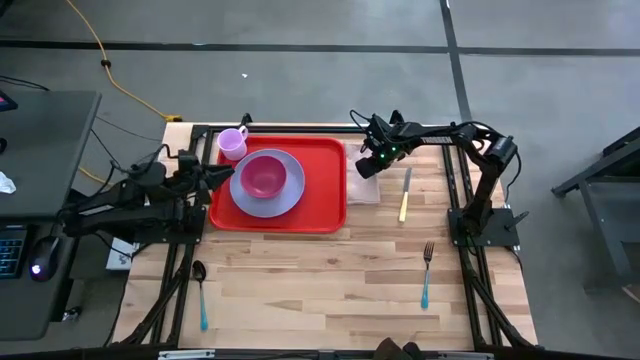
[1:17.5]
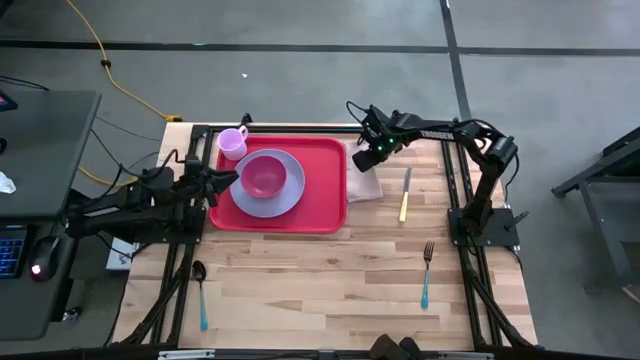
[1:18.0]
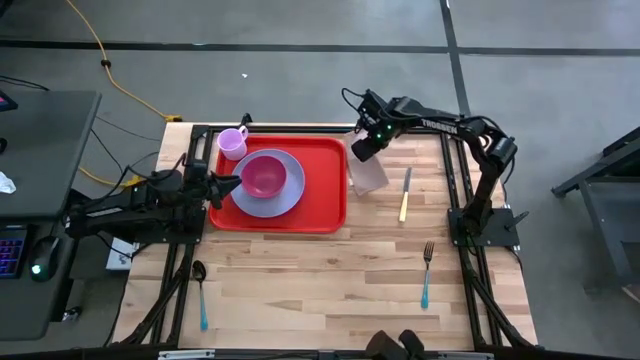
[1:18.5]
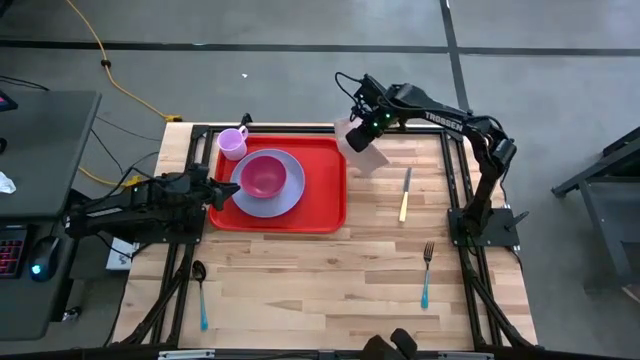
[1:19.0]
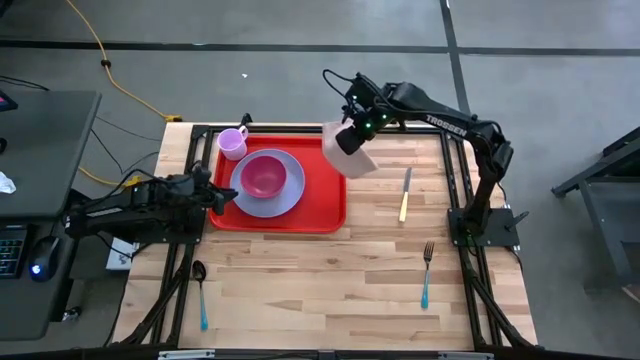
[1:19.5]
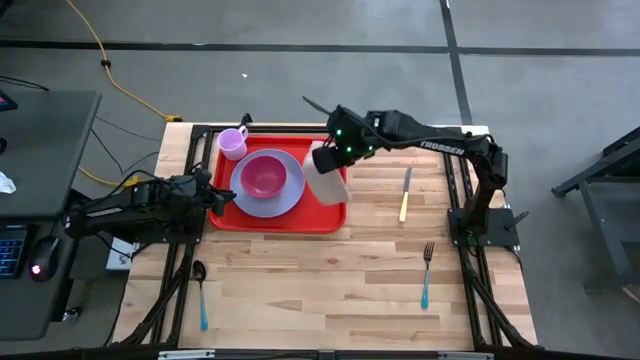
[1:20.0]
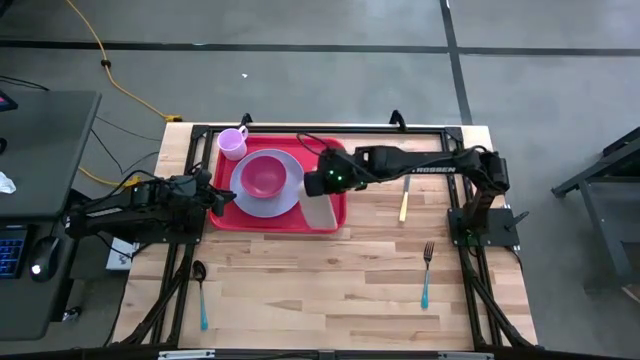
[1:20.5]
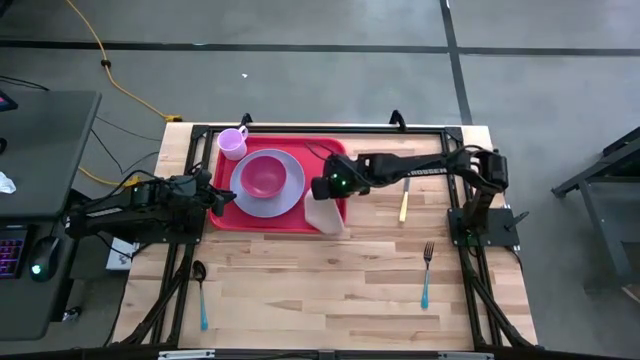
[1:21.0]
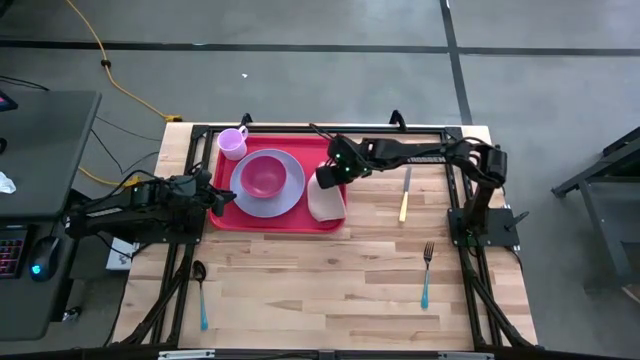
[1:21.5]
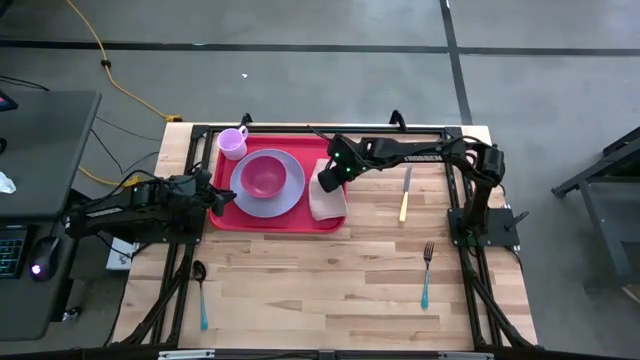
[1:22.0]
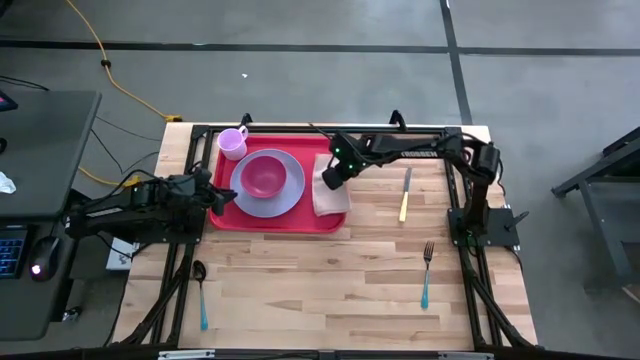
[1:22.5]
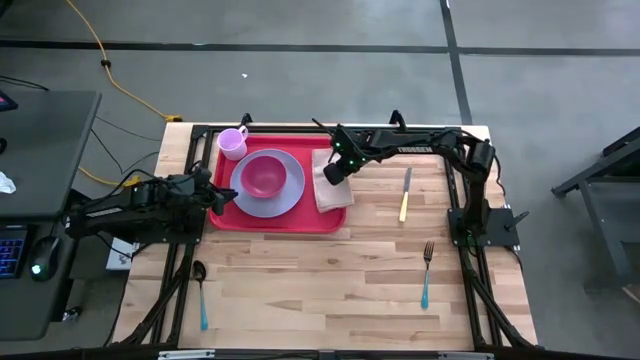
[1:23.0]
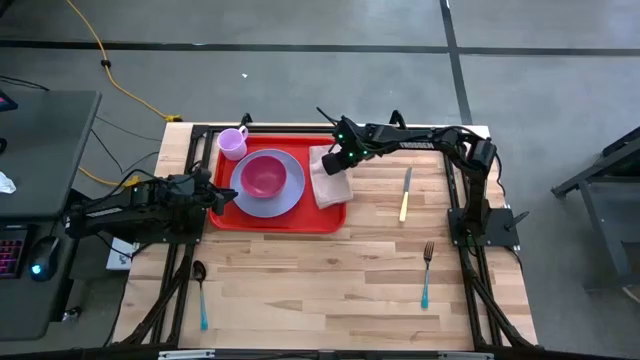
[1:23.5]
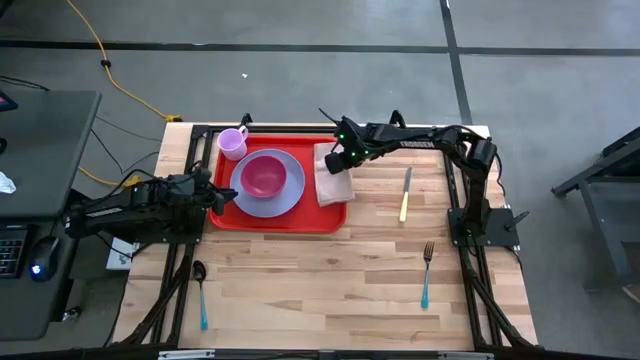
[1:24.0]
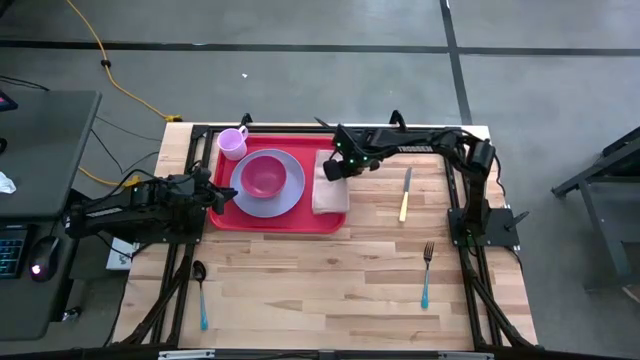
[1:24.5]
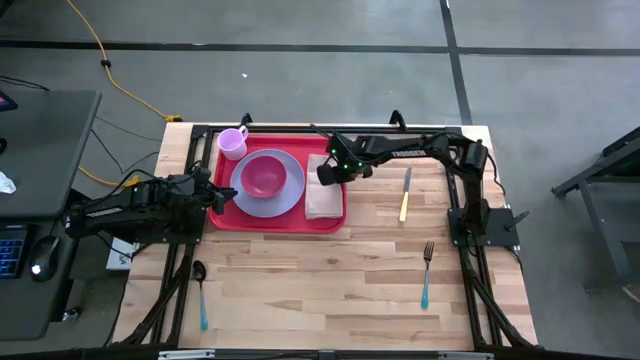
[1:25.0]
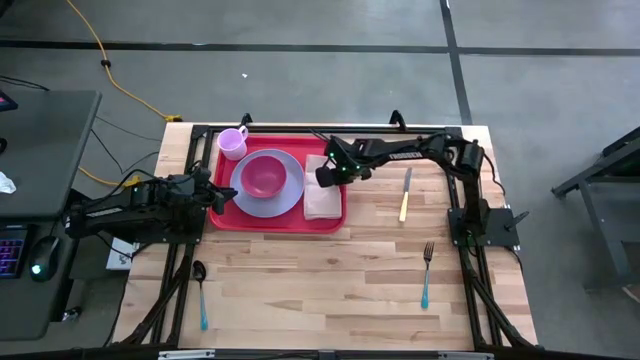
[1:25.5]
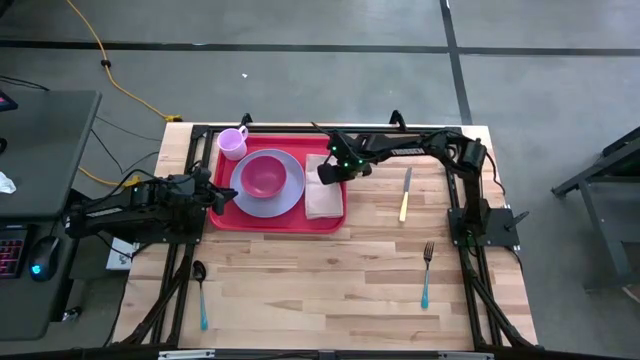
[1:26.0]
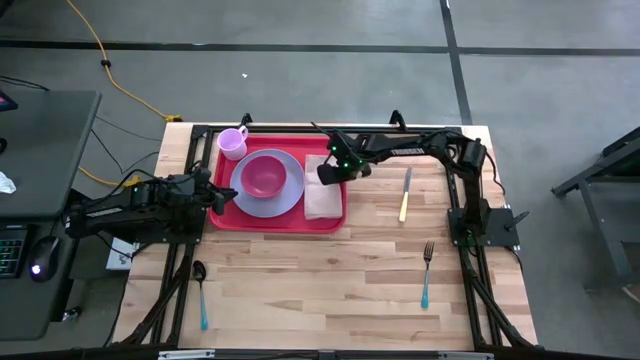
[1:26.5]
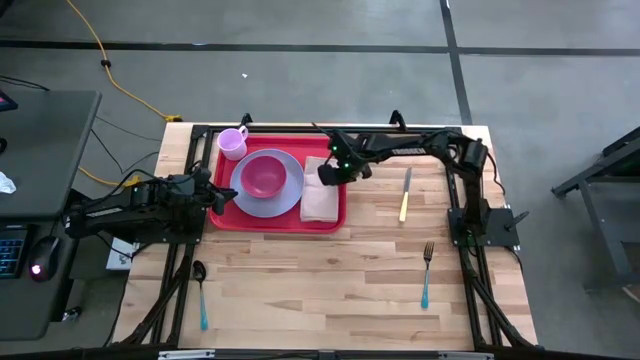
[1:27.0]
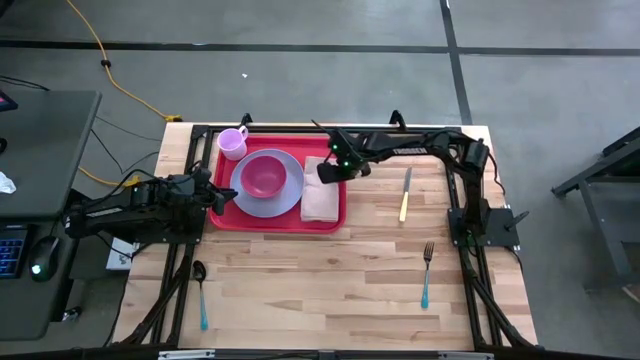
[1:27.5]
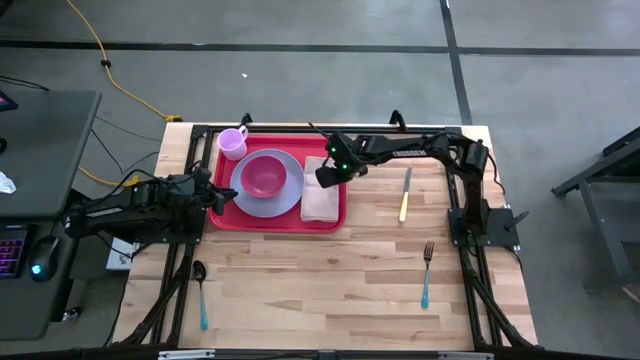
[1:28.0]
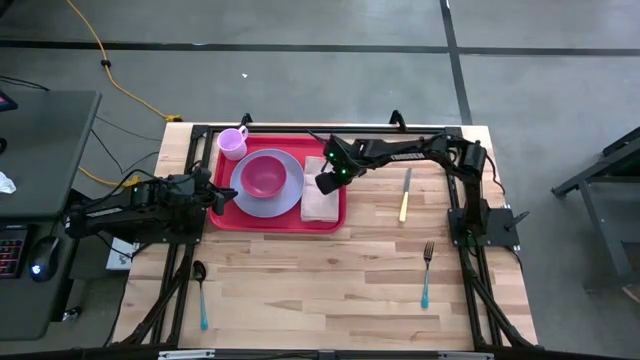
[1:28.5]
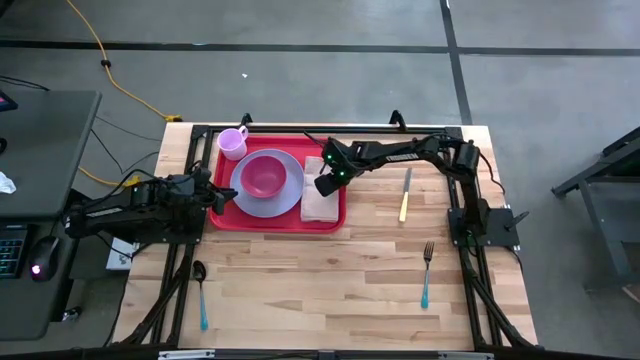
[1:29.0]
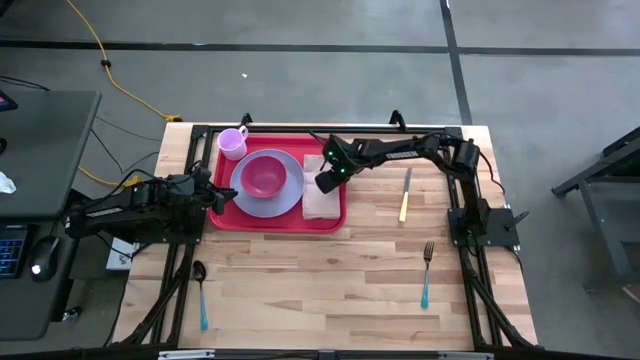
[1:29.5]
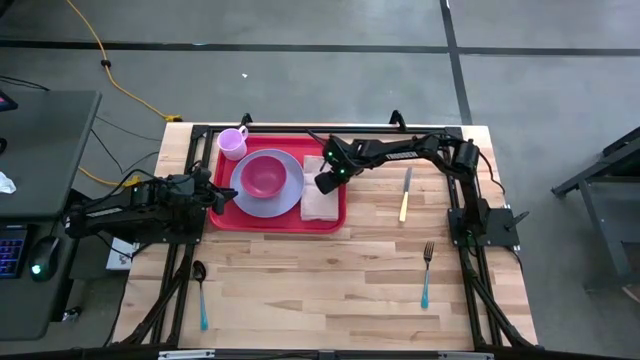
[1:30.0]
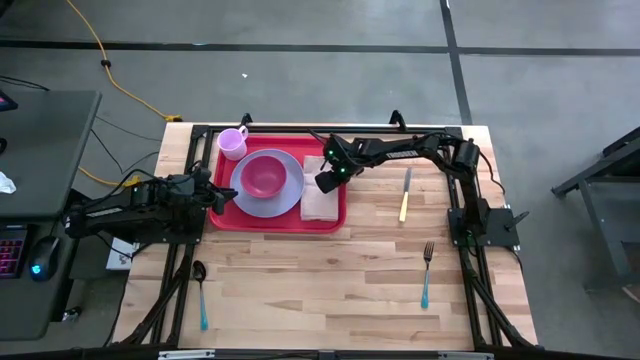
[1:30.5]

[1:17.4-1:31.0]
Task: Set up tray
Put the white table napkin on the red serving tray to the right of the purple plate

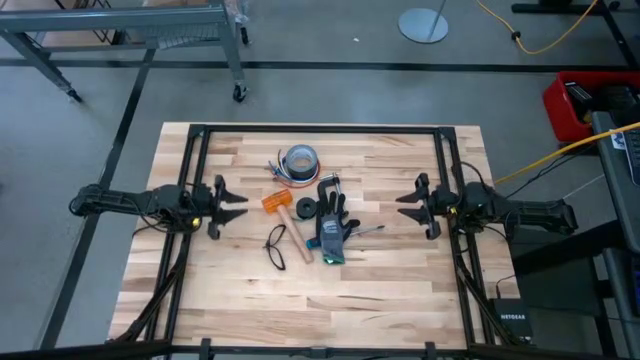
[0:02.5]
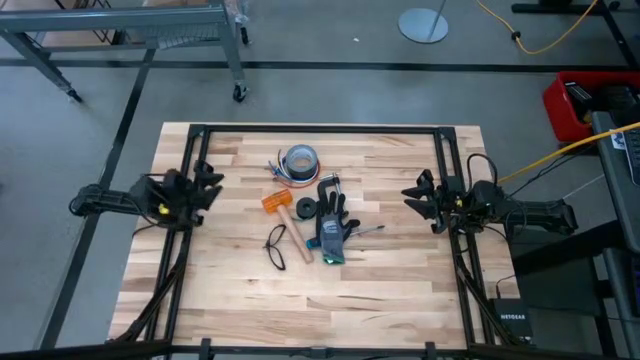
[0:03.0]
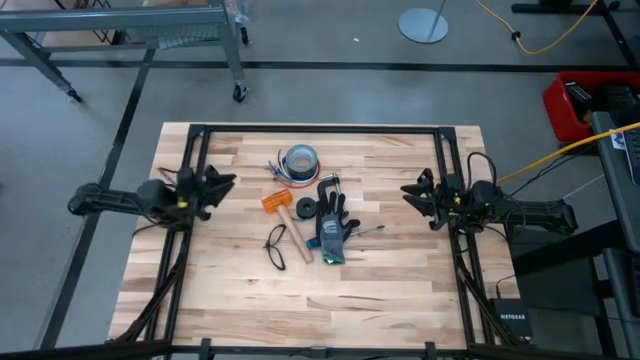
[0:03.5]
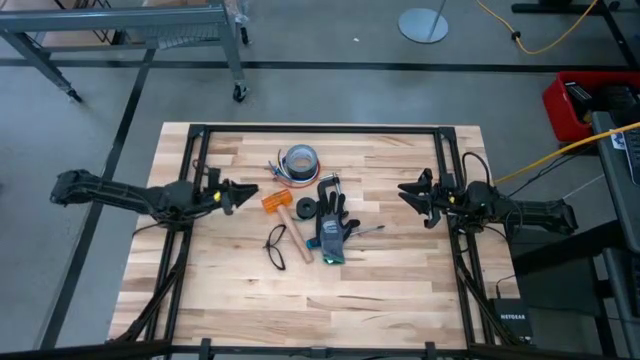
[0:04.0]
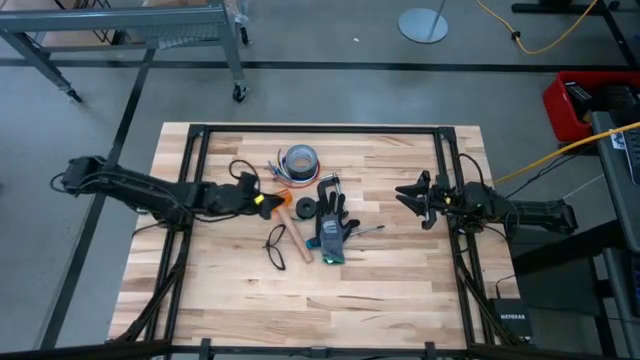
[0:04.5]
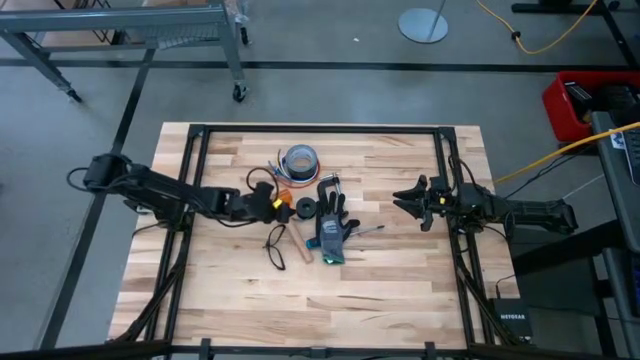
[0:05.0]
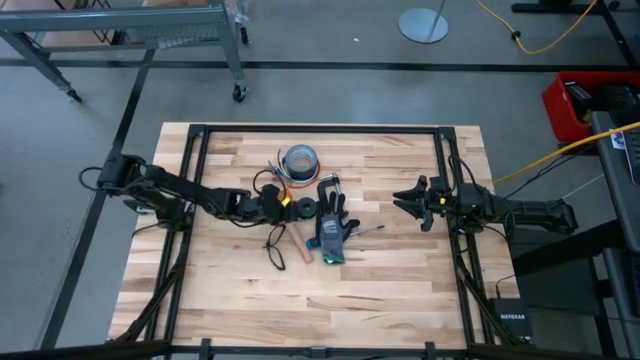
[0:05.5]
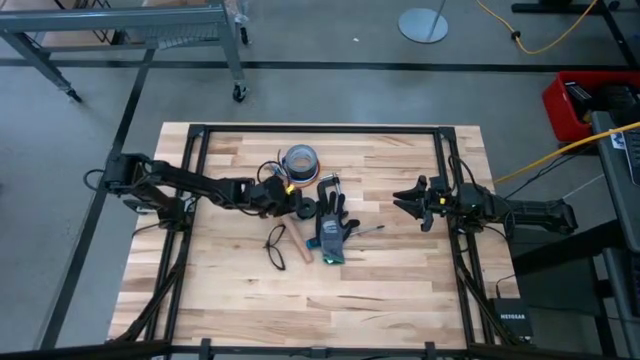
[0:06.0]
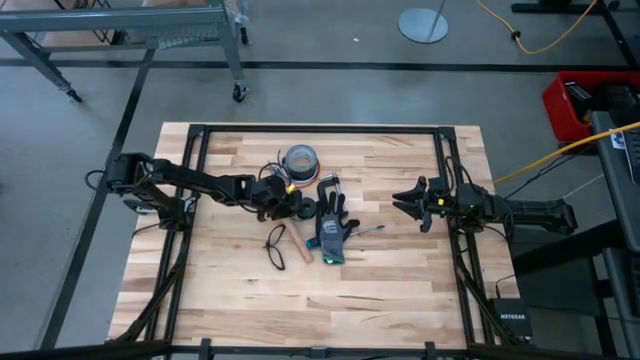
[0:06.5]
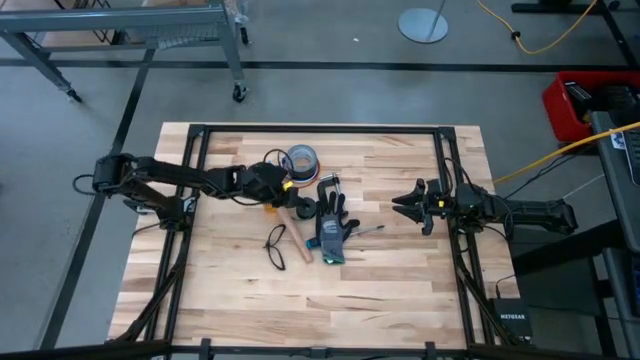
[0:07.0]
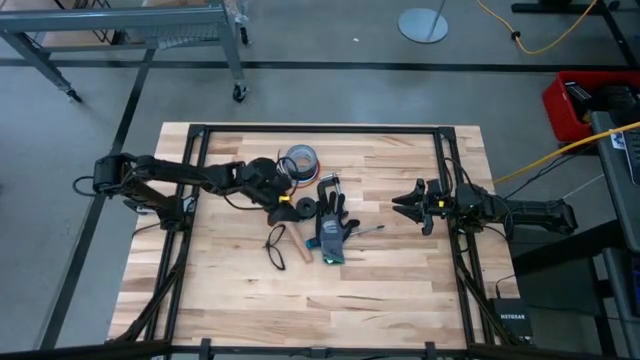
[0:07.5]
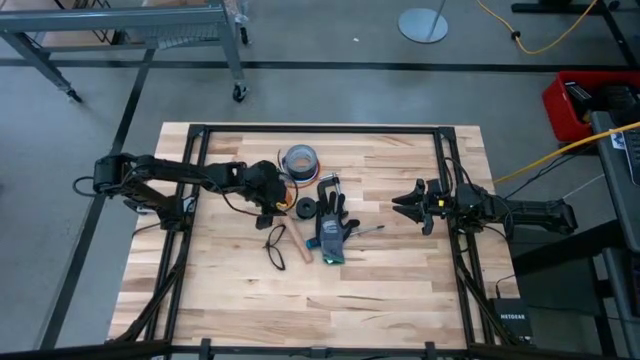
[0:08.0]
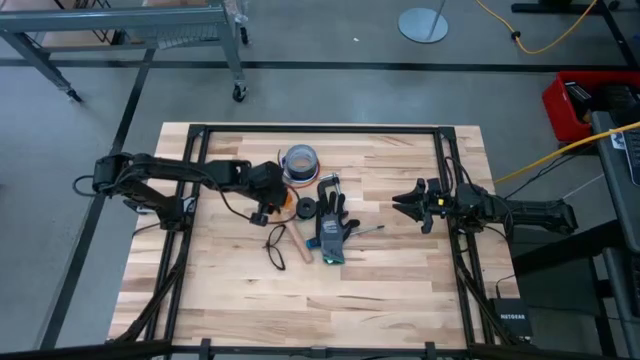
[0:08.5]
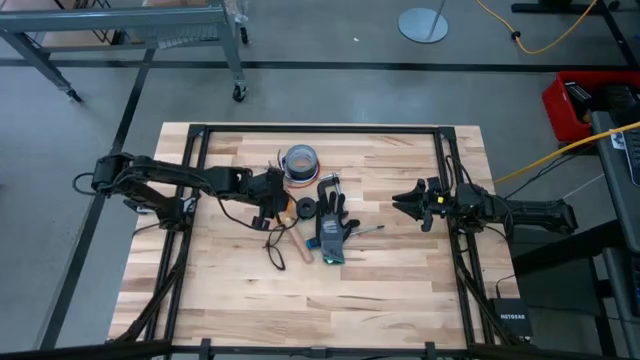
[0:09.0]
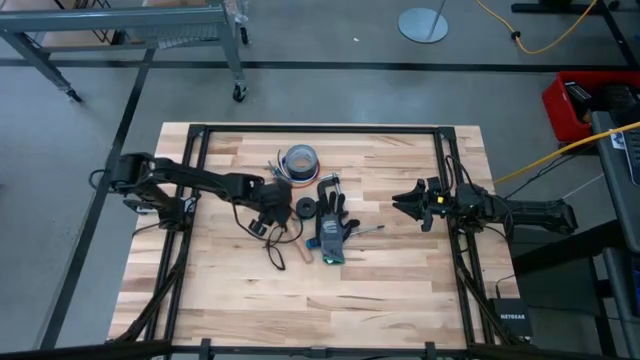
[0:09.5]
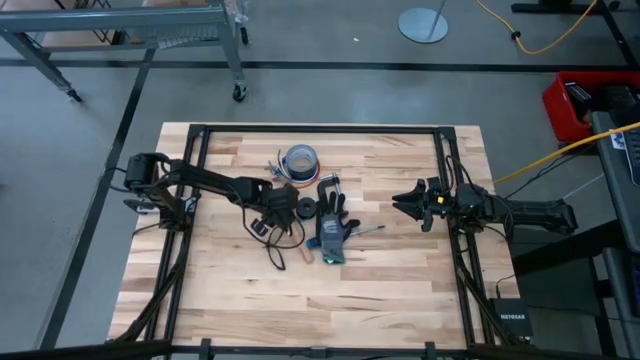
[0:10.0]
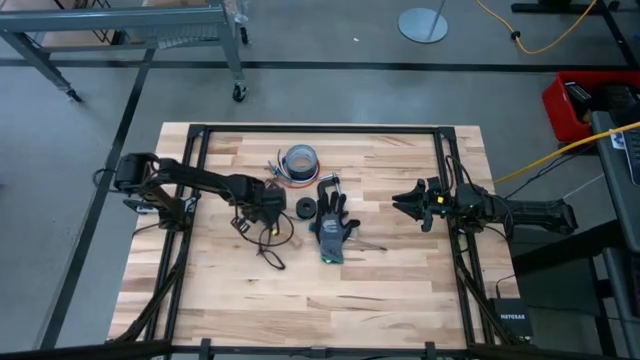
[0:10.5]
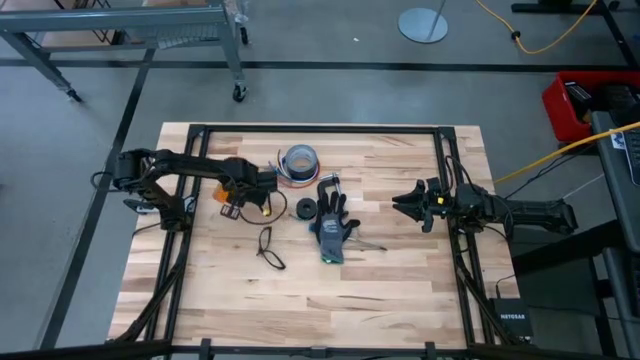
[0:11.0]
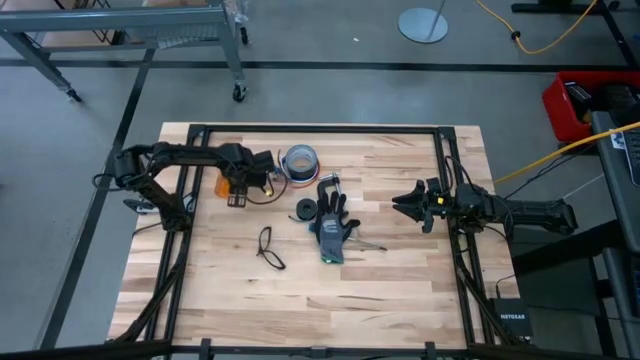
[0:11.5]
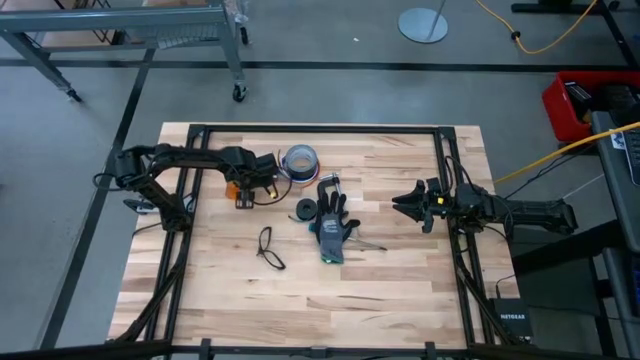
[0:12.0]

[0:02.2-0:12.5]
Task: Coil cords
Move the orange hammer to the upper right of the table
